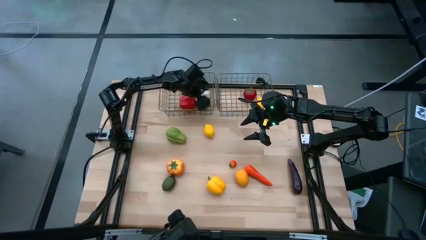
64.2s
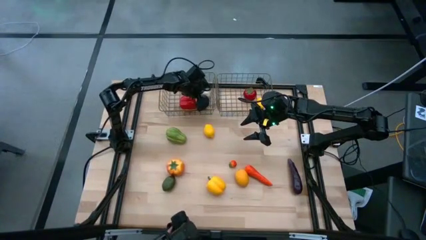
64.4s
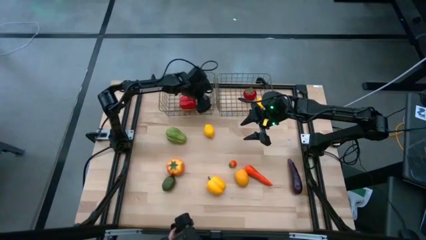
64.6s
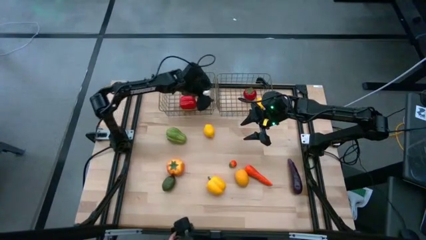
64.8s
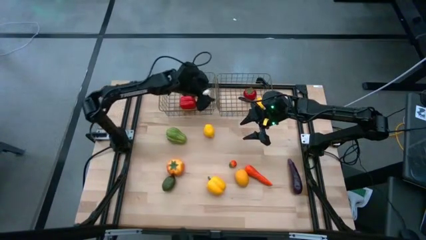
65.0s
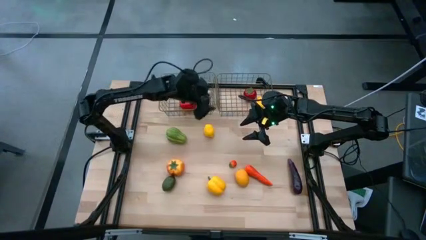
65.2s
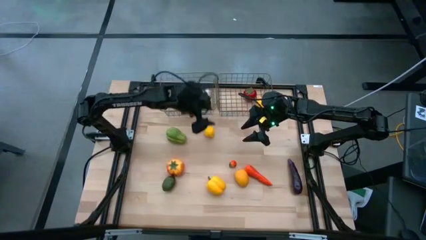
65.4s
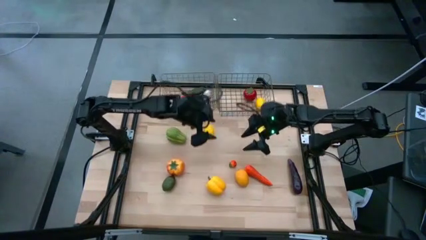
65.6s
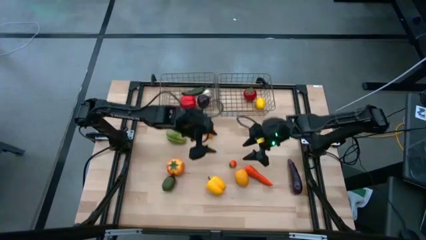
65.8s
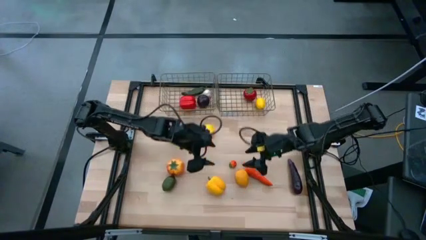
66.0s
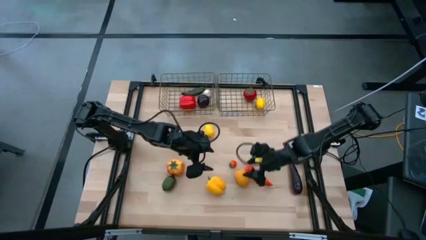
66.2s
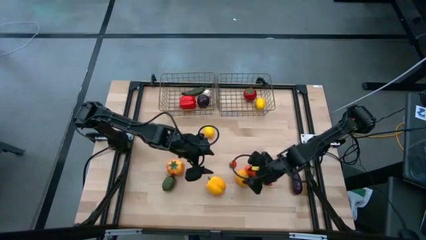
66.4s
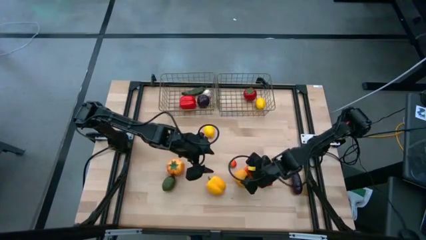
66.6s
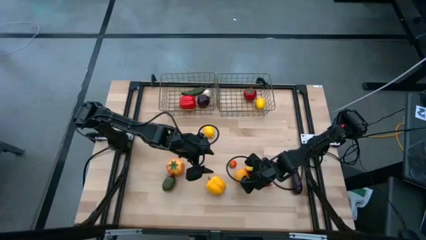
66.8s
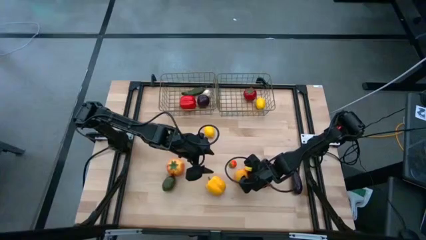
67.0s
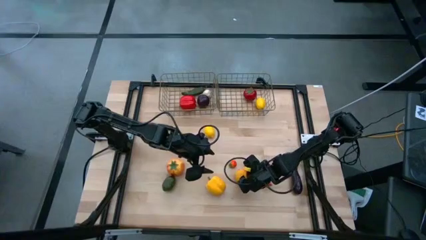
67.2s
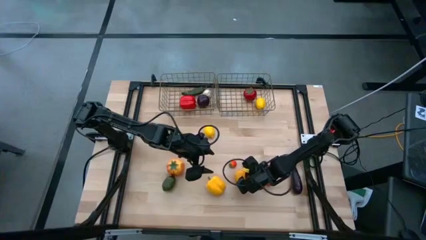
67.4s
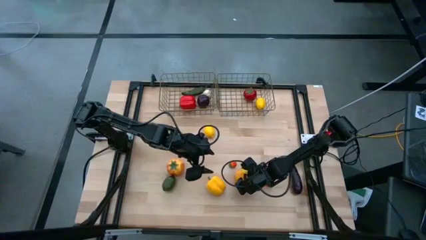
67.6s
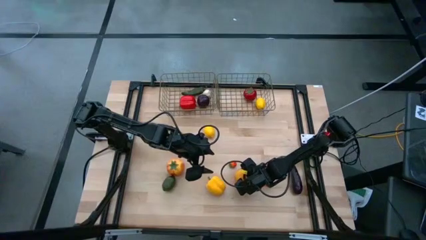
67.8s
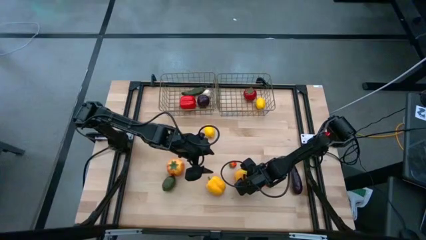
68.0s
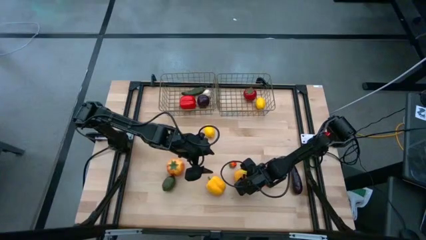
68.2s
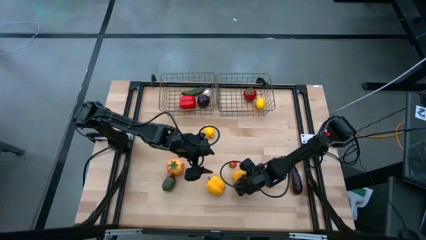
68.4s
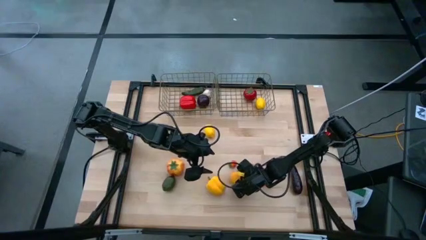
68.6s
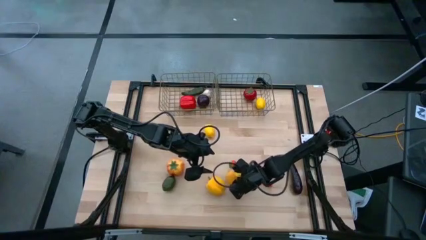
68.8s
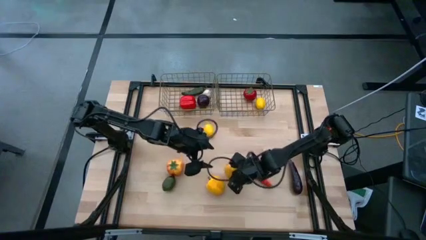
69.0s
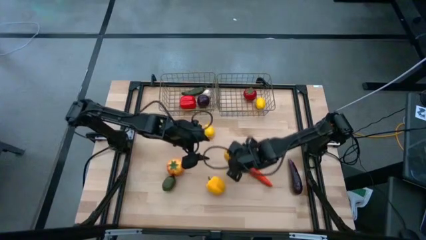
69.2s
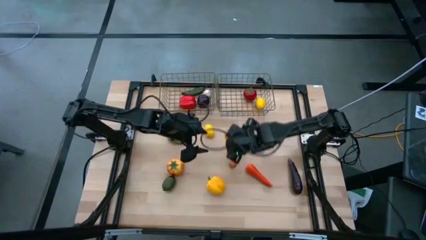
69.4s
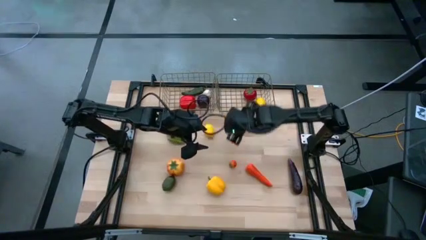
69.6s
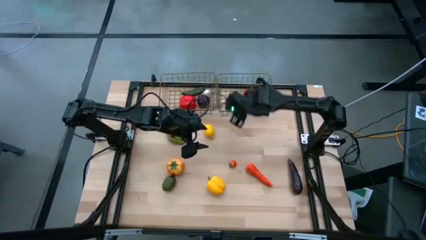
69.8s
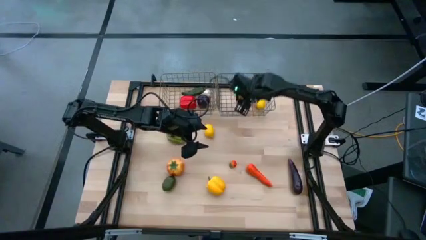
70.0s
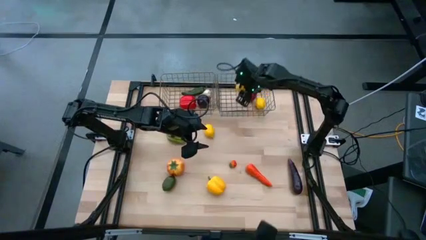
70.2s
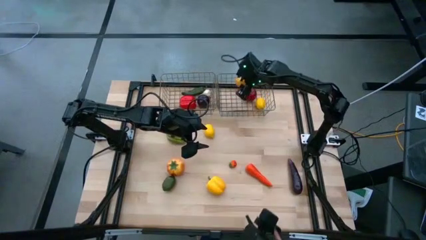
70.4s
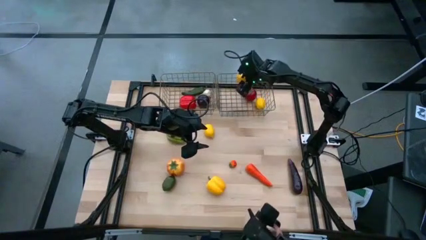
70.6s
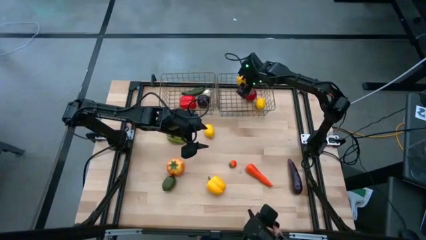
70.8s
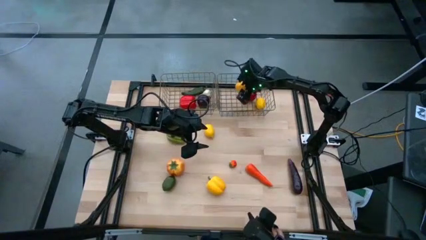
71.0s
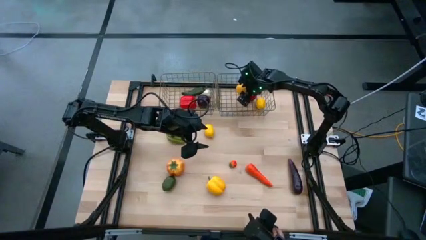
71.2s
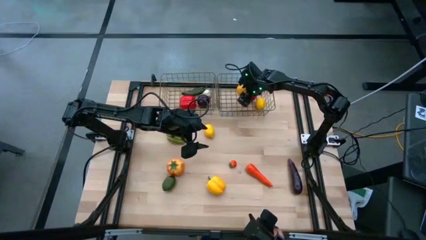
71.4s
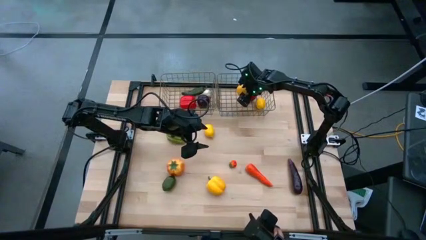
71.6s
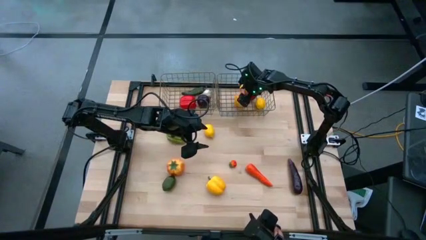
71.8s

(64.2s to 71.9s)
Task: Sort produce into baskets
Put the yellow passion fruit into the right golden wire basket

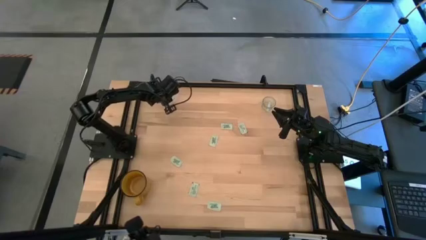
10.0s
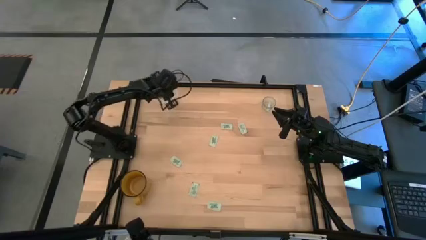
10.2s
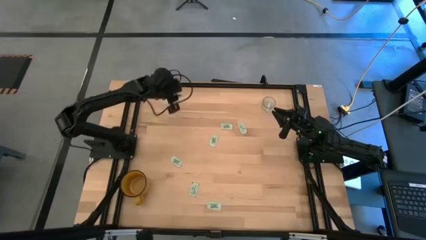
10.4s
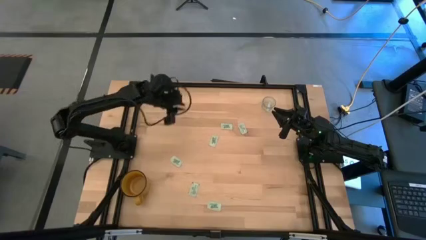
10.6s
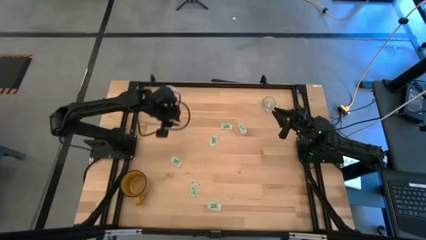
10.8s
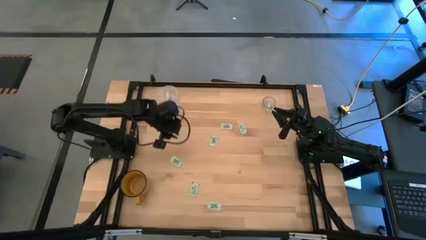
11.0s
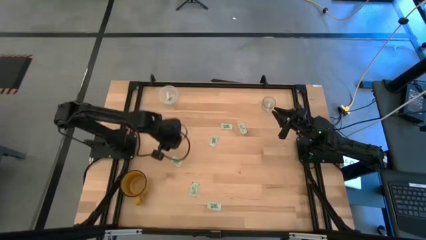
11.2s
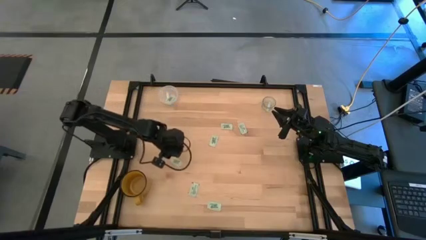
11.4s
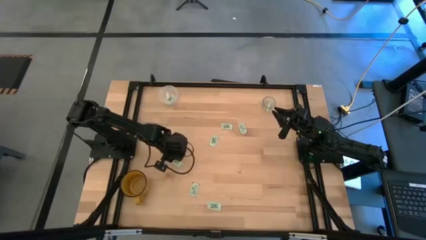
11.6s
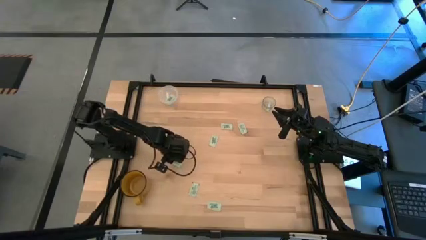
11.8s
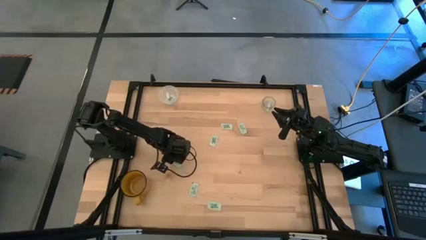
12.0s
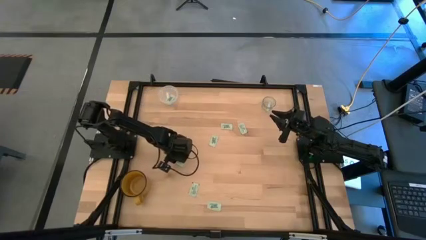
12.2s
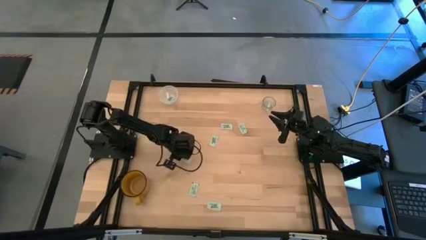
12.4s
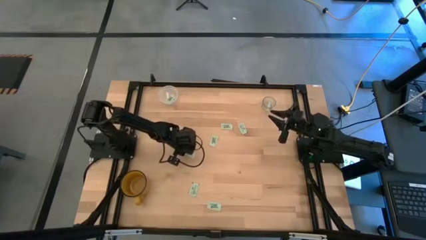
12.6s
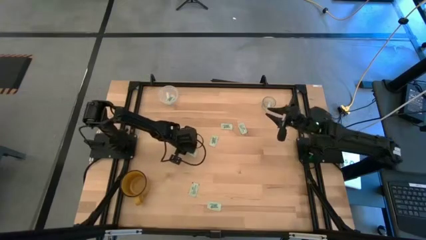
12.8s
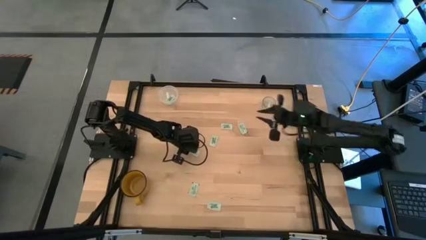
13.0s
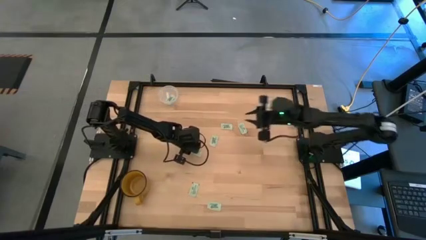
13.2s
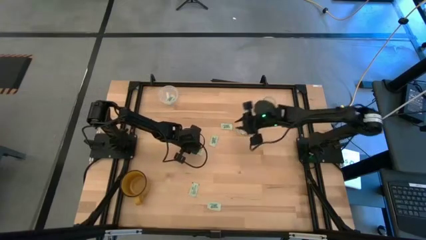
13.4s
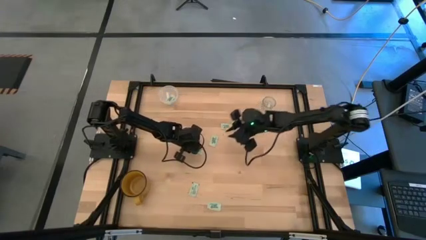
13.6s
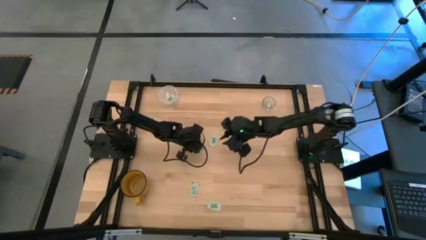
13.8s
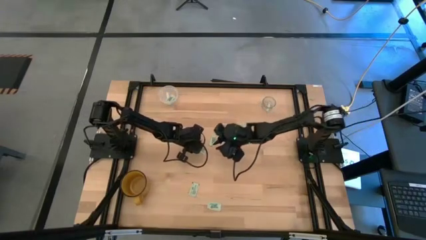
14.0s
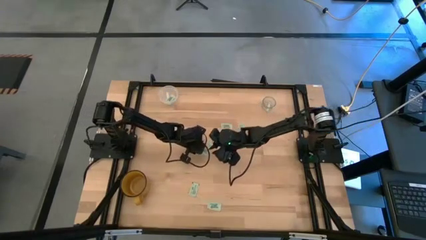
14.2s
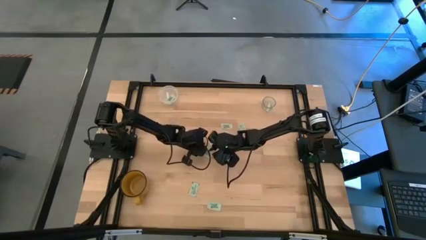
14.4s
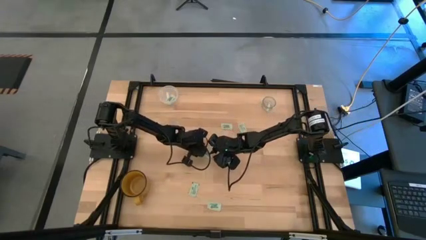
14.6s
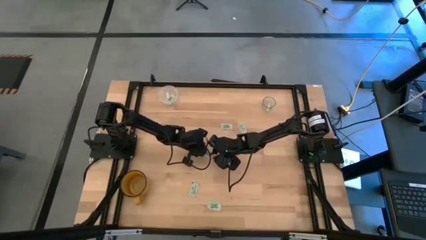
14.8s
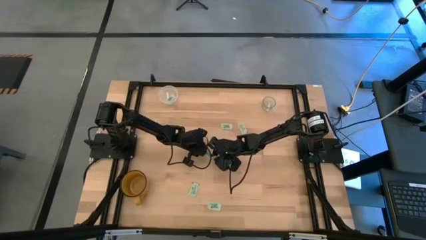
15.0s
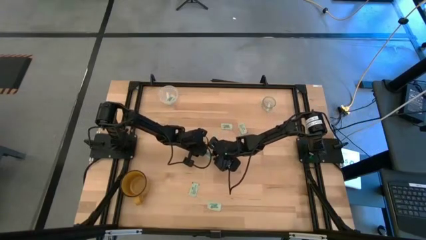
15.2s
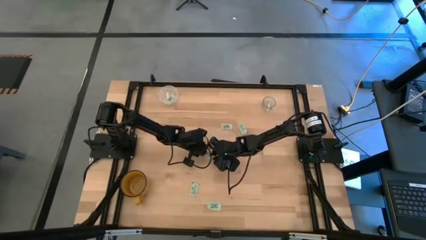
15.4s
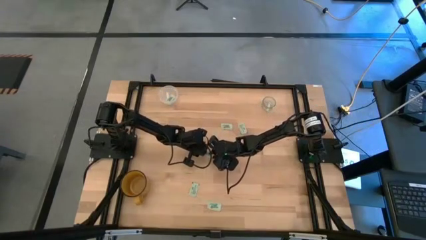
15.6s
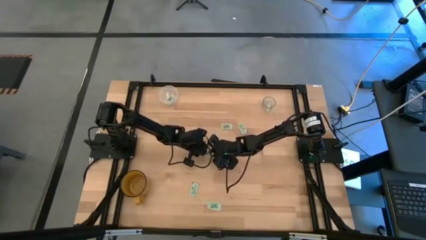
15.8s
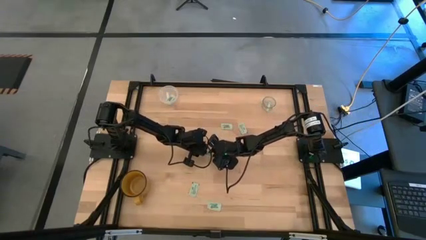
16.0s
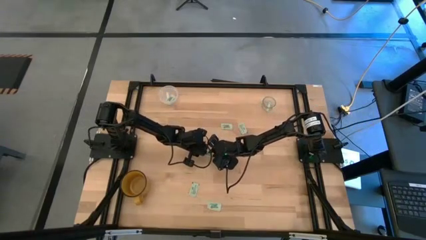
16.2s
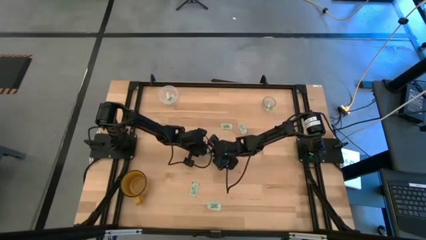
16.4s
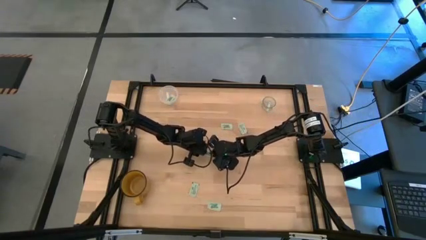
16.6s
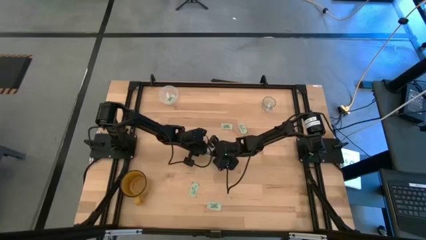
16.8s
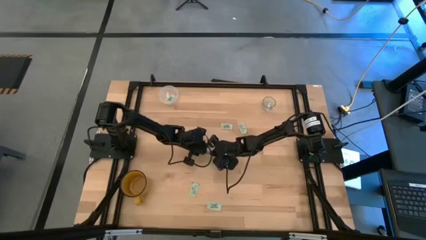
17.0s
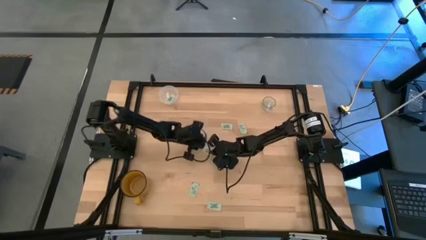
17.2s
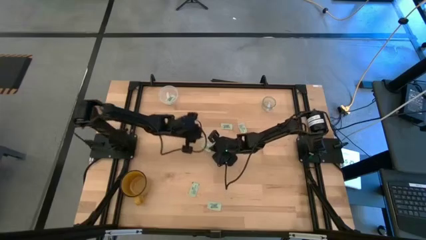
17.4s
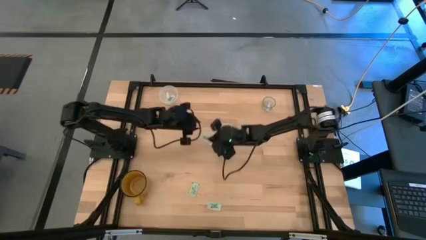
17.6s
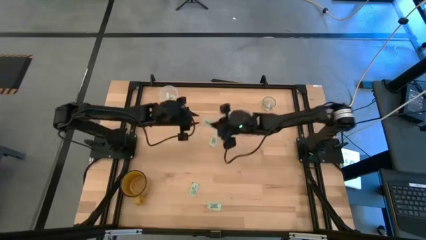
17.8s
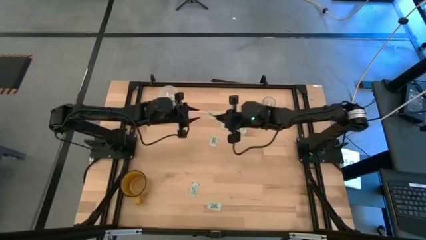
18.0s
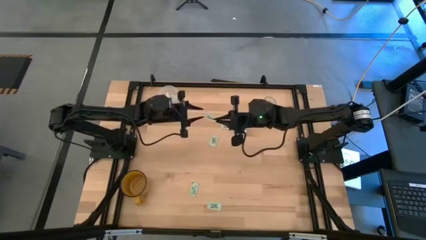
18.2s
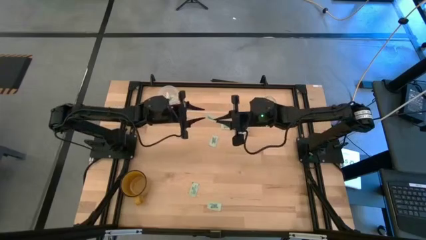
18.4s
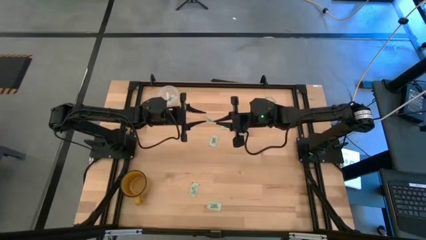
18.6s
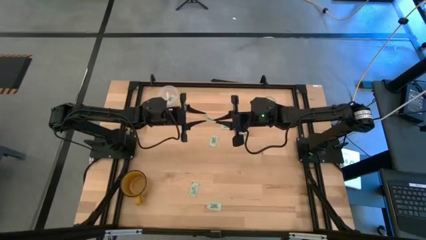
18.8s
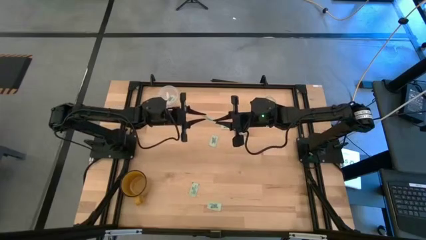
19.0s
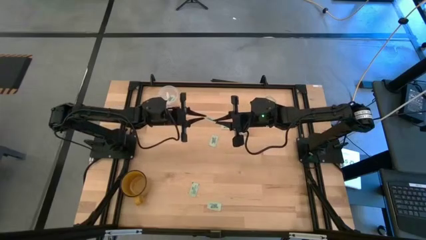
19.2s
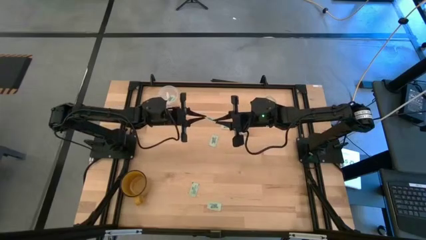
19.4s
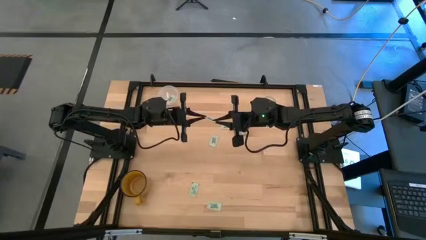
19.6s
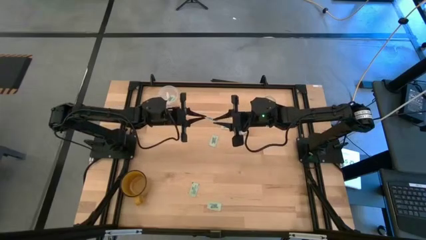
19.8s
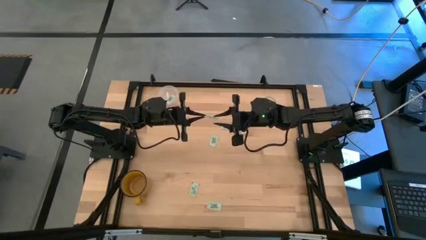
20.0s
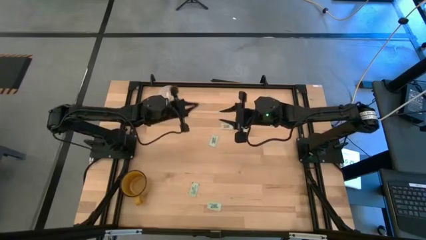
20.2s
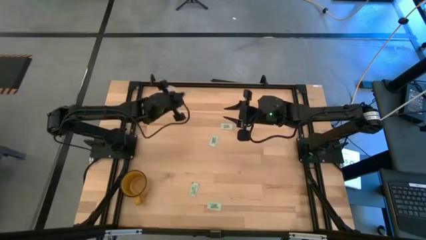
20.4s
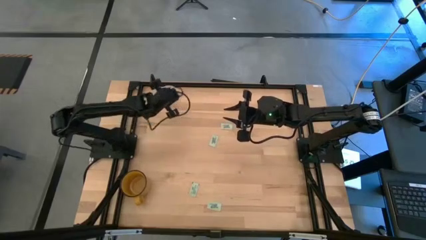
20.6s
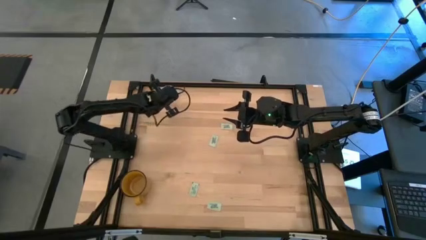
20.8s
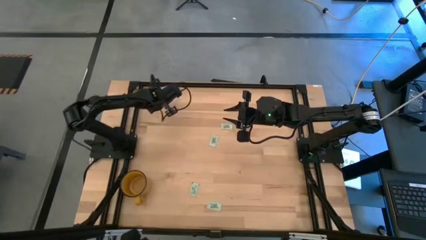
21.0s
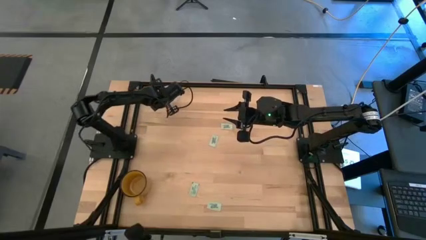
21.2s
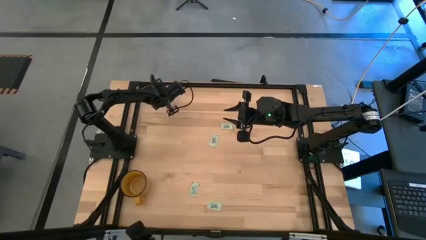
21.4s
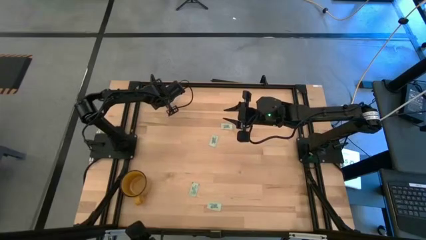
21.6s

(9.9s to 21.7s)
Task: Pick and place Stevia / Truvia into bins
Put the green stevia packet into the transparent container
